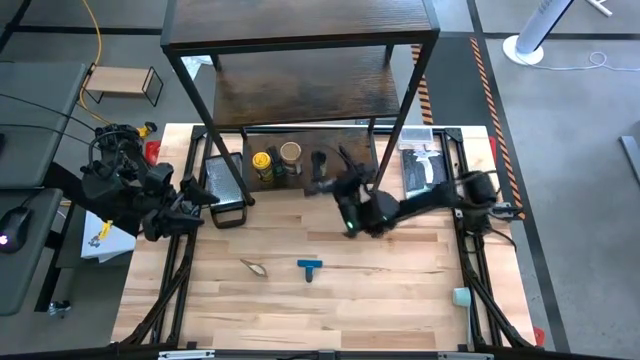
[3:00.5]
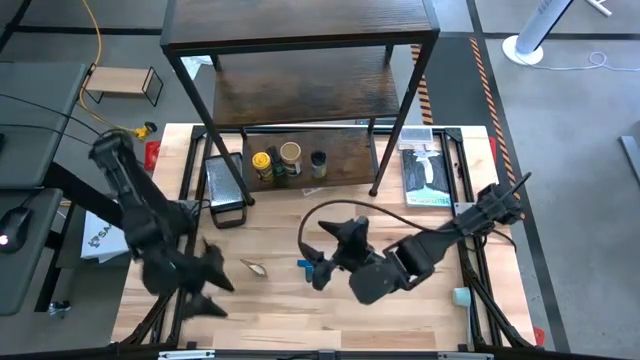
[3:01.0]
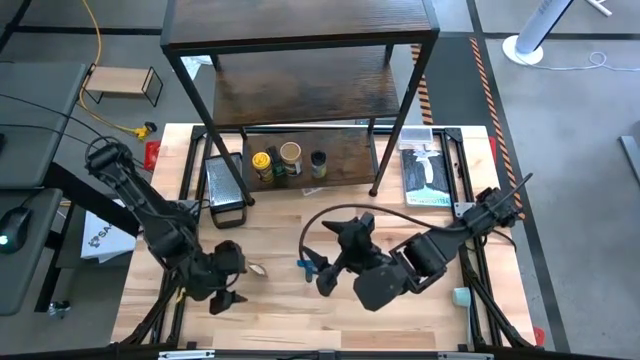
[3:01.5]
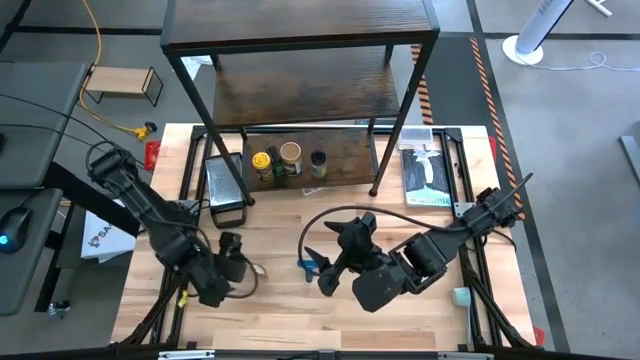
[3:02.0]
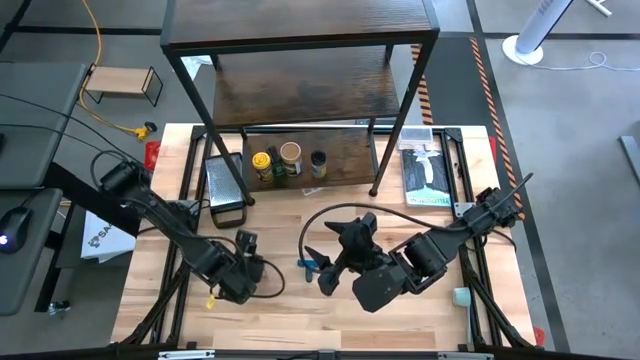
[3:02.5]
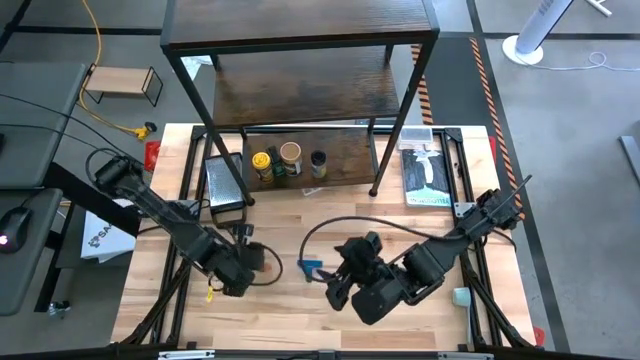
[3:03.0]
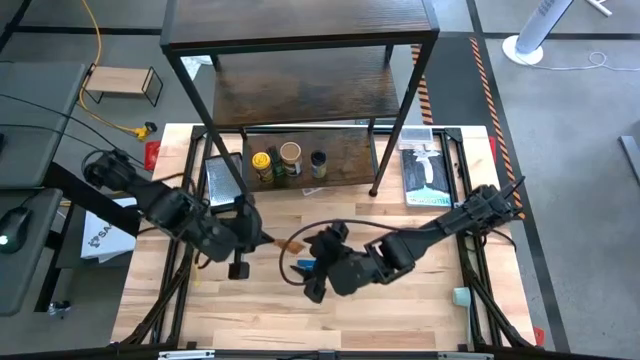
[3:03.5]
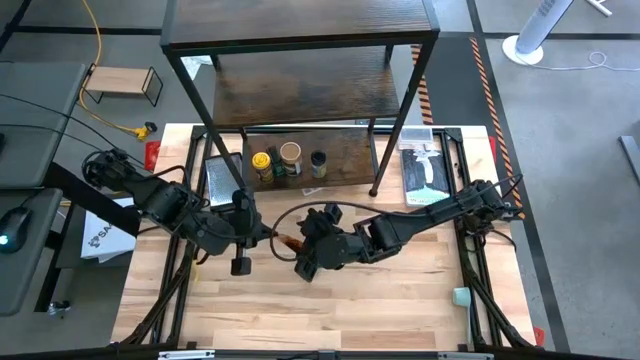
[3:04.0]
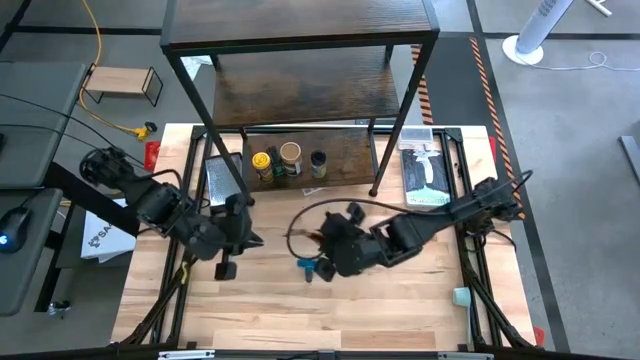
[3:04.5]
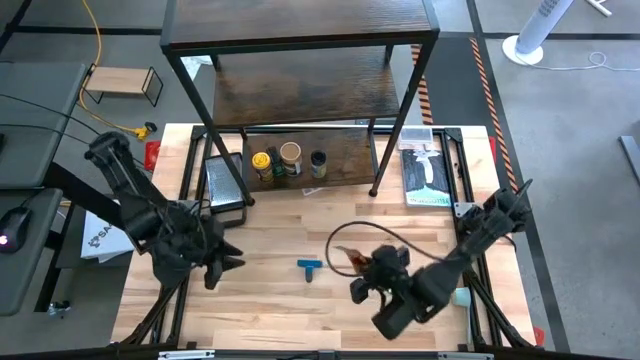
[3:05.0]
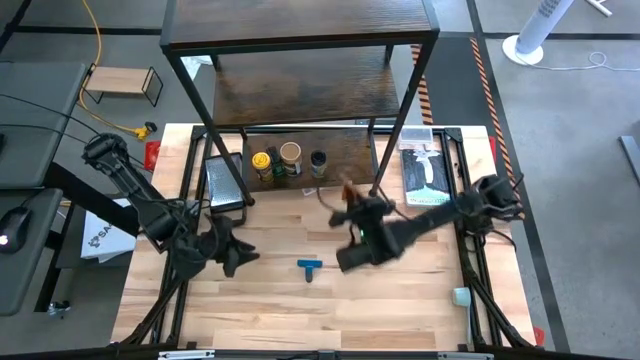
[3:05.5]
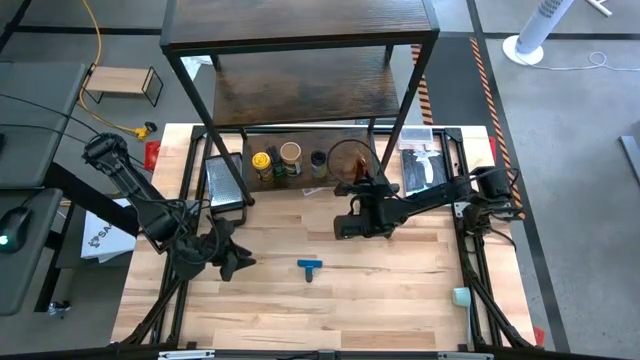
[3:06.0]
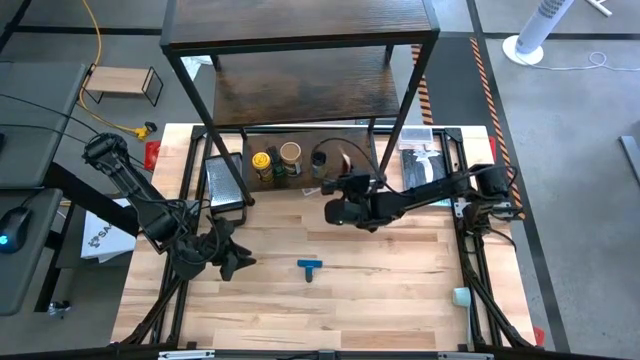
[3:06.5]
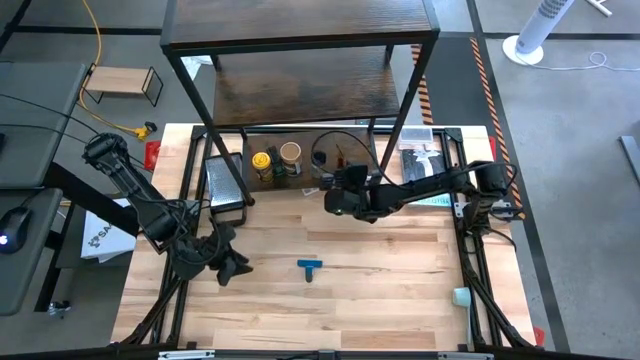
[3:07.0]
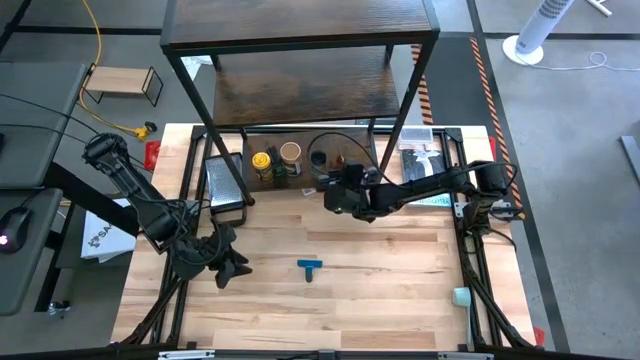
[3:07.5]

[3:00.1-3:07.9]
Task: Shelf spices
Put the brown seasoning pack on the shelf

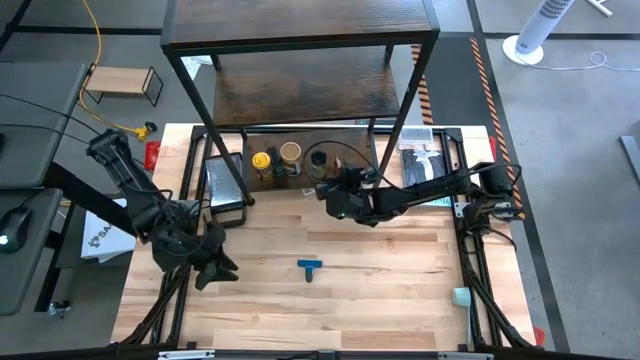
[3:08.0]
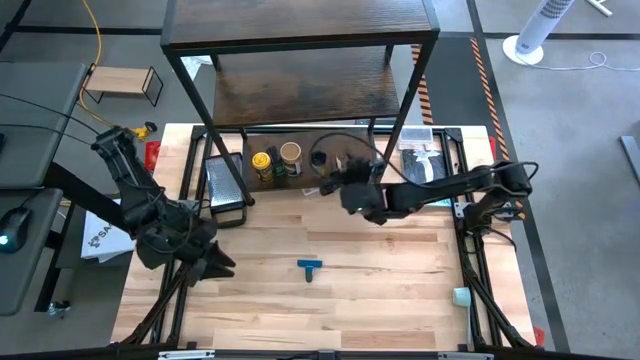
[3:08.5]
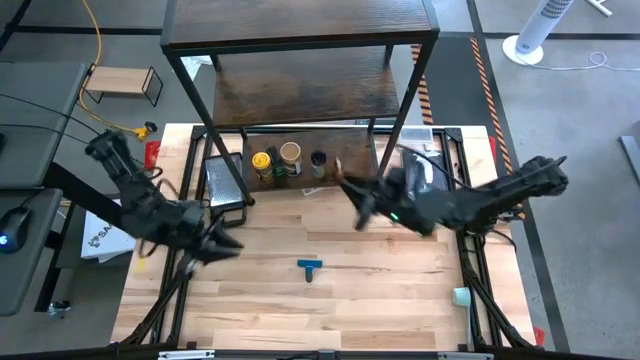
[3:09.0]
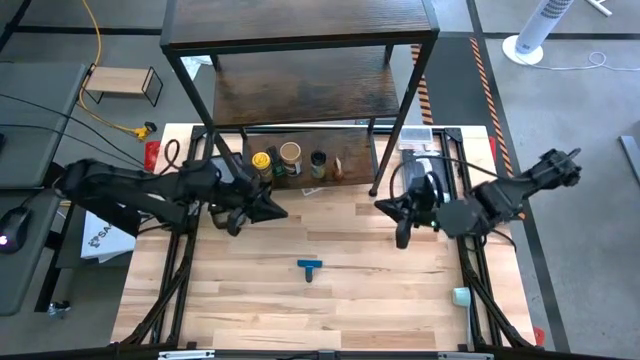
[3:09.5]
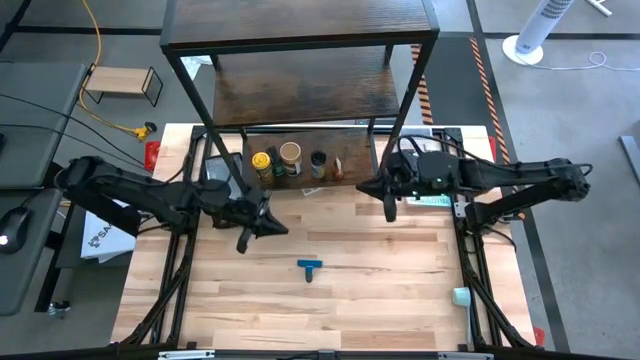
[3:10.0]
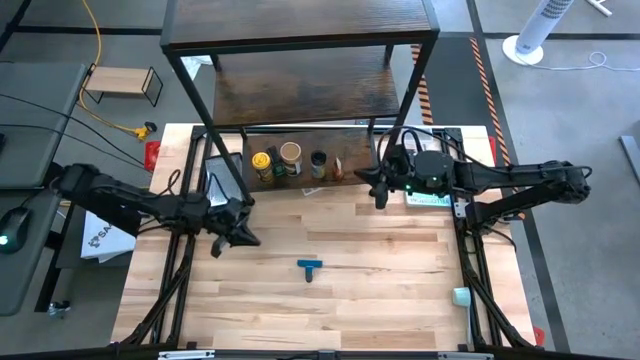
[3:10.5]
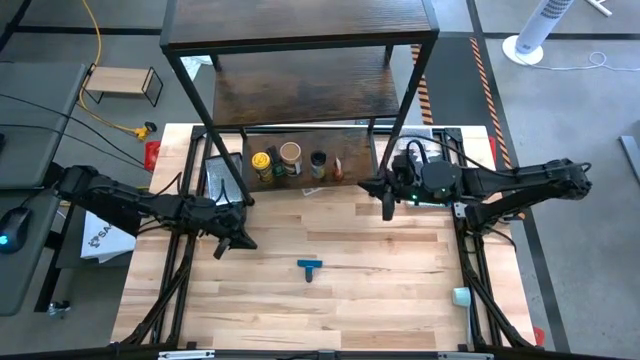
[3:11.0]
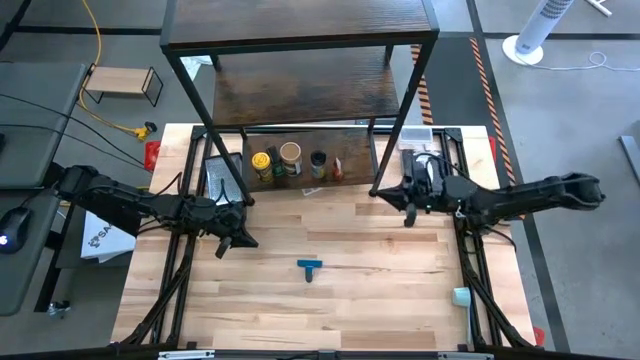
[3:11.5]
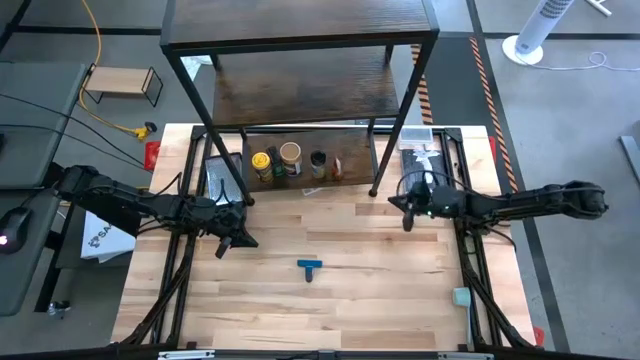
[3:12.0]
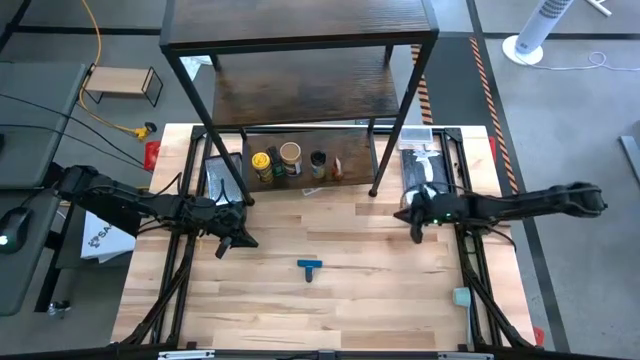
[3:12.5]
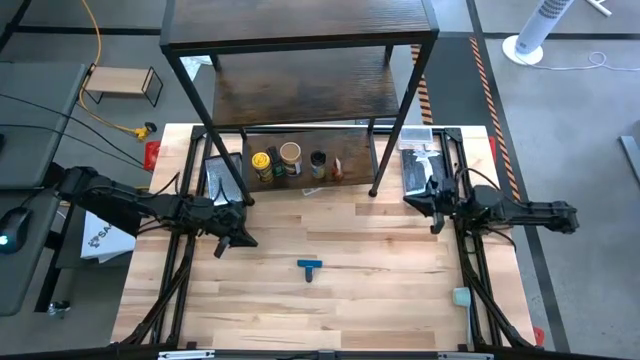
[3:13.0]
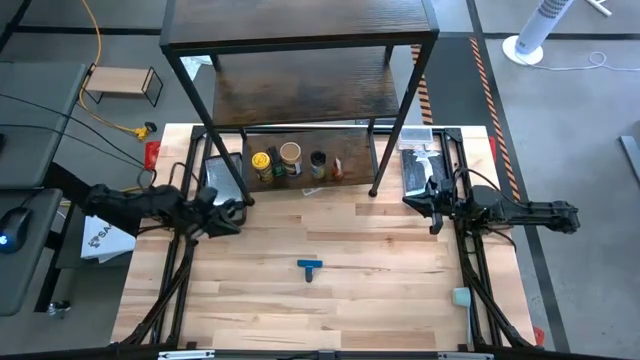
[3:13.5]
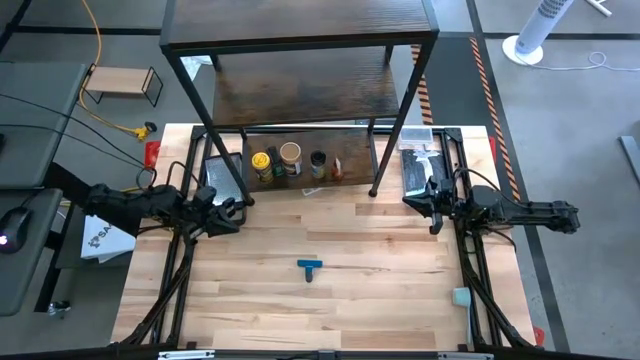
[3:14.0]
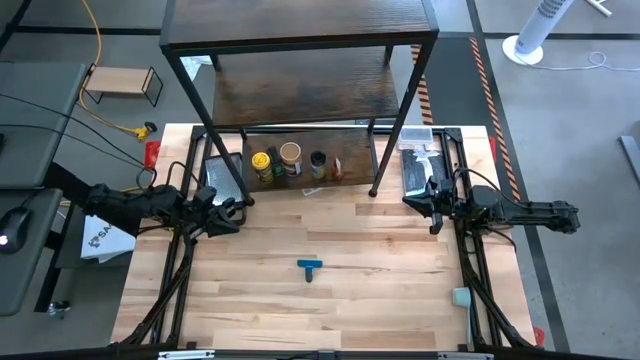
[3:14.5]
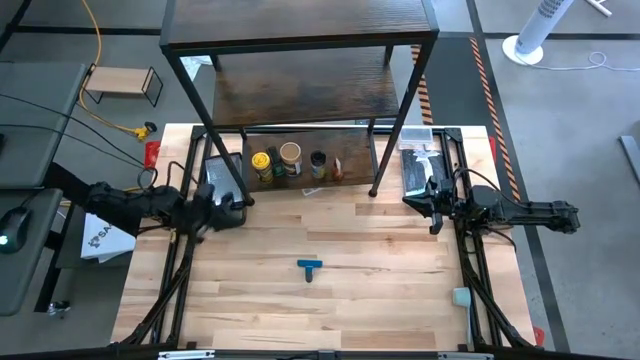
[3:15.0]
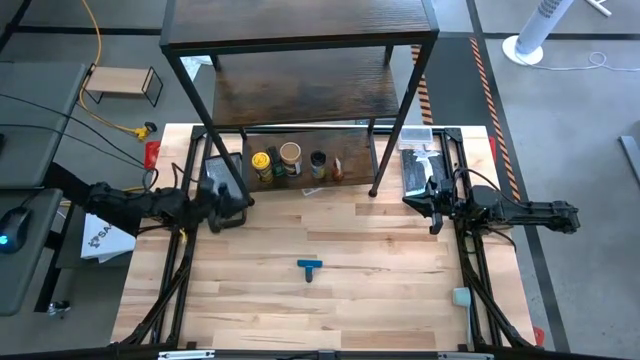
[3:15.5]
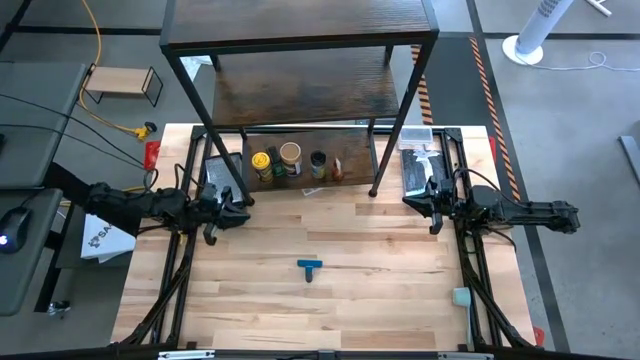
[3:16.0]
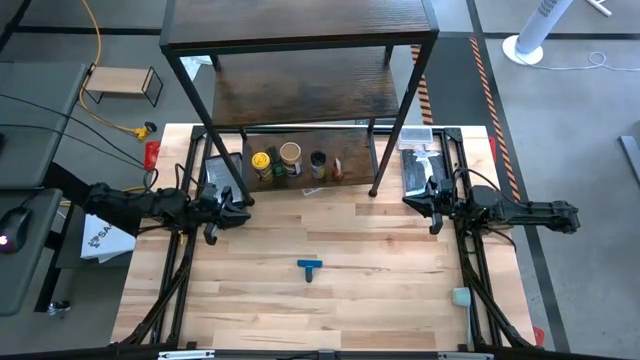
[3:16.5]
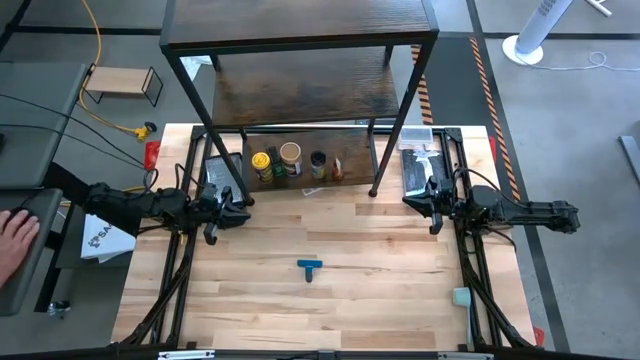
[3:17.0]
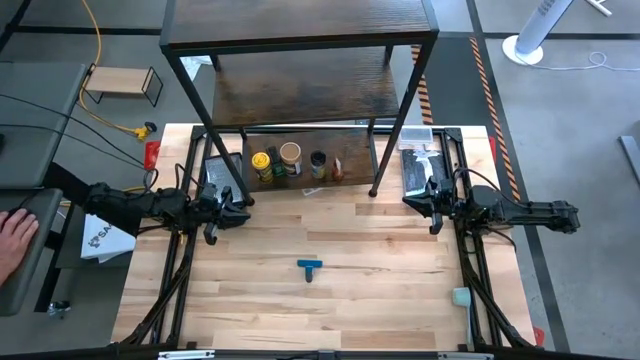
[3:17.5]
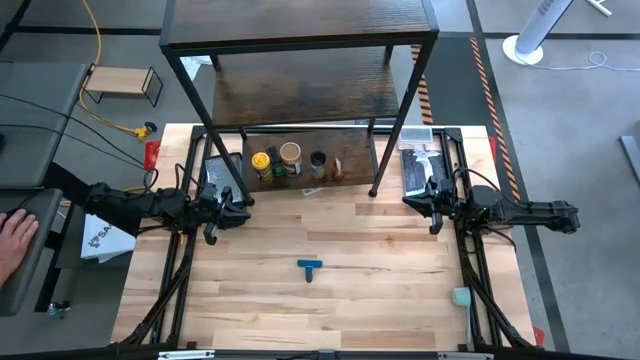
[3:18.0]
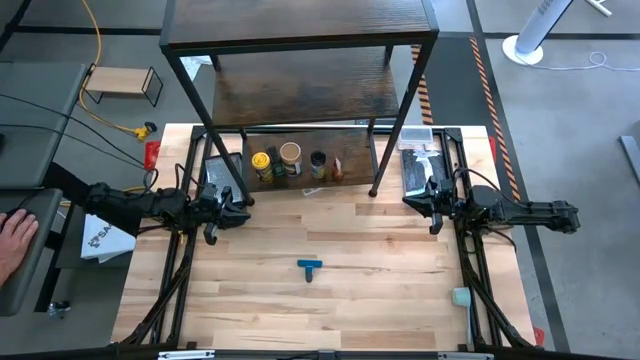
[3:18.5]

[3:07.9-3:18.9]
Return to Home Position

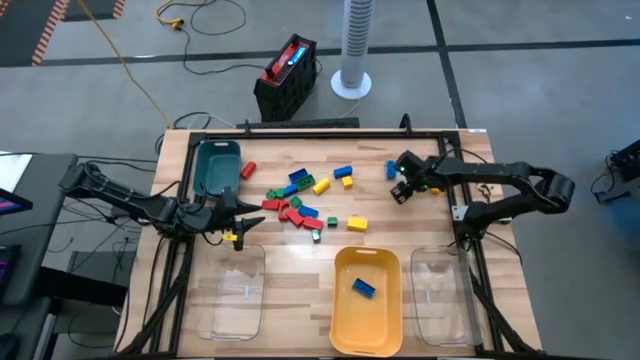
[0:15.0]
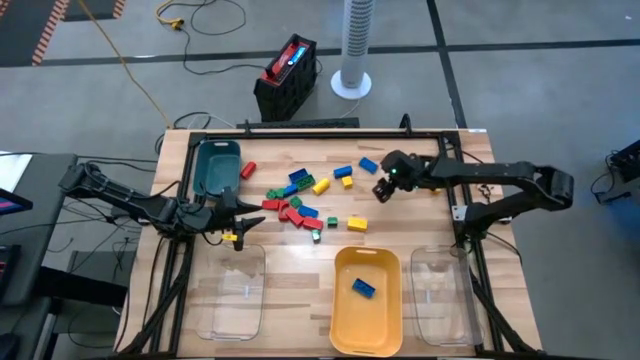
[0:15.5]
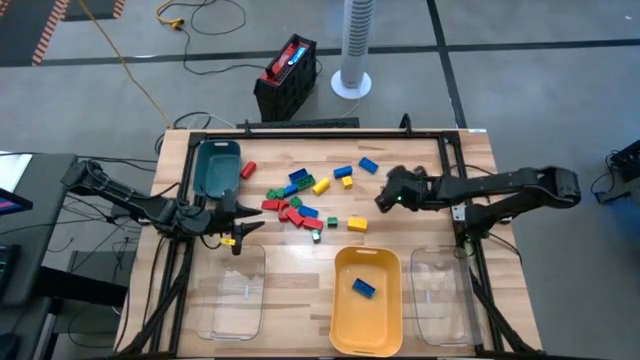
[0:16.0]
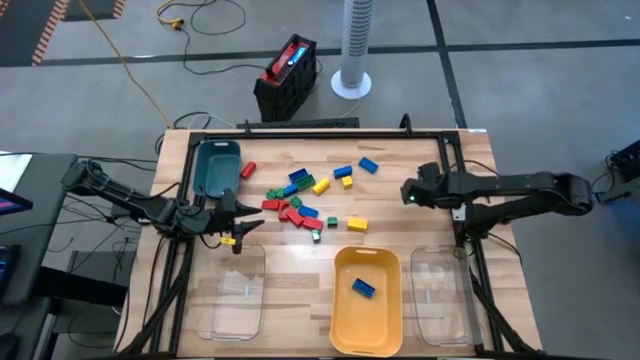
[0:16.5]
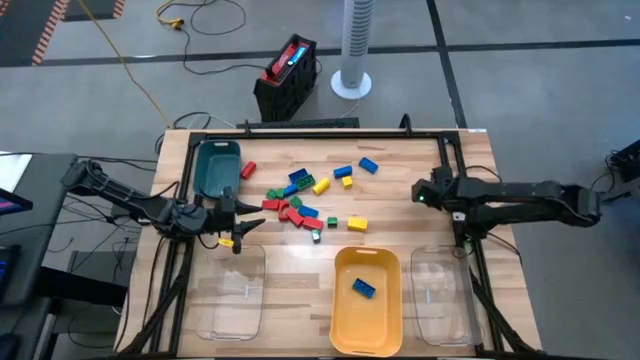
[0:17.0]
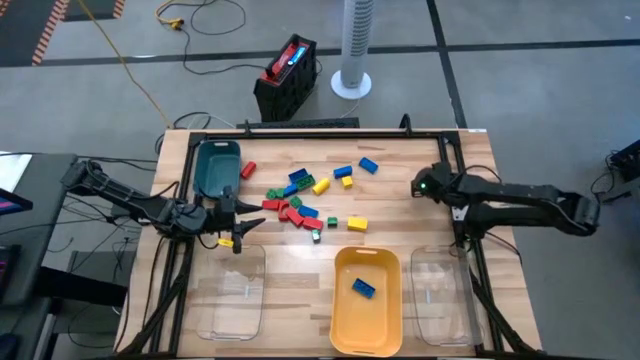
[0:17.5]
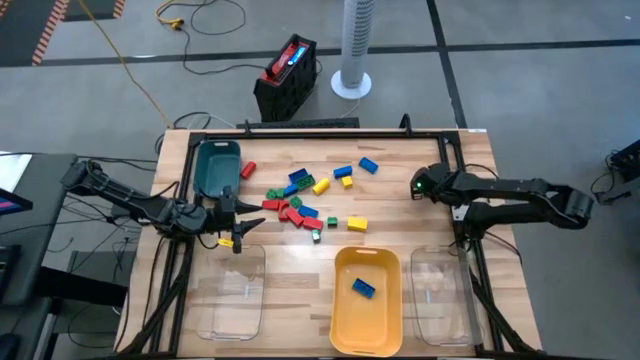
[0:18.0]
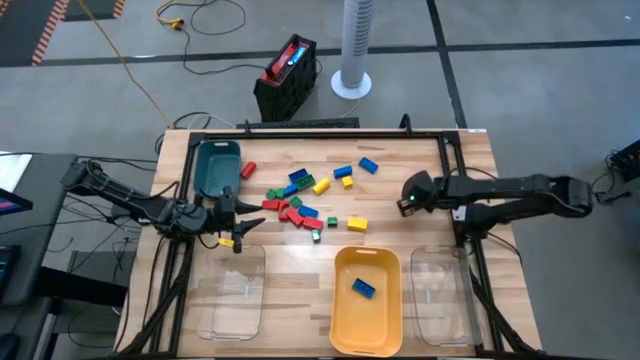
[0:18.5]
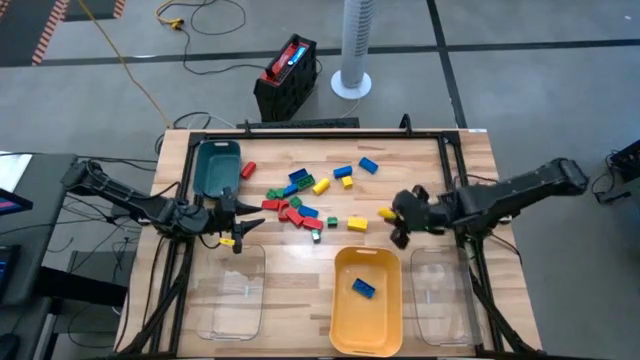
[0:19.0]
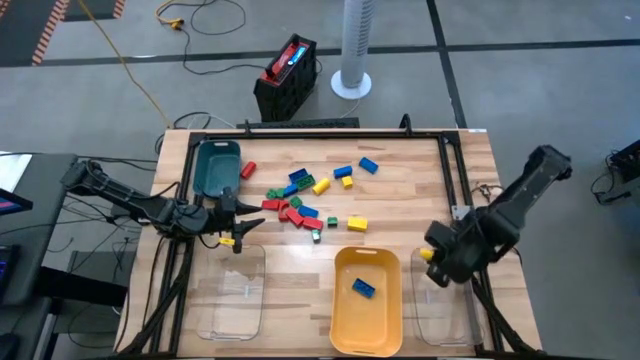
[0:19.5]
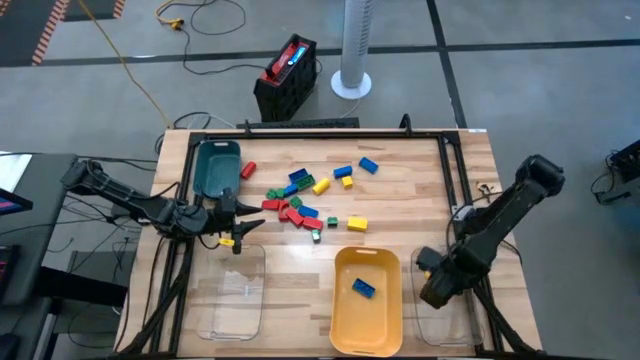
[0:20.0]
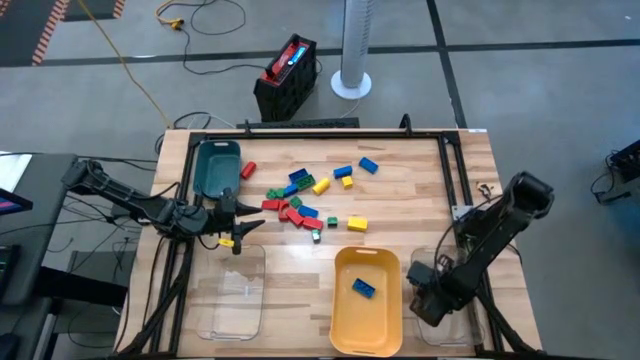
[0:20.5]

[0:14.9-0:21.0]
Task: Sort blocks
Put the yellow wooden block into the right transparent bin
